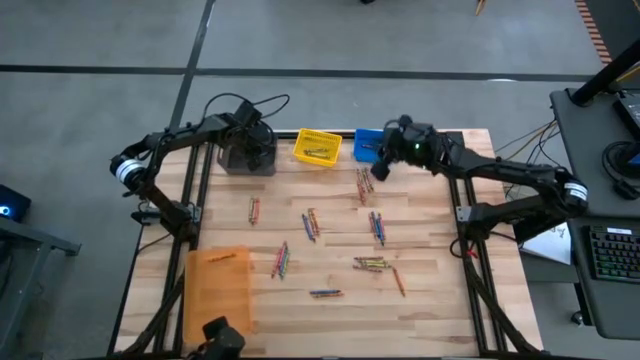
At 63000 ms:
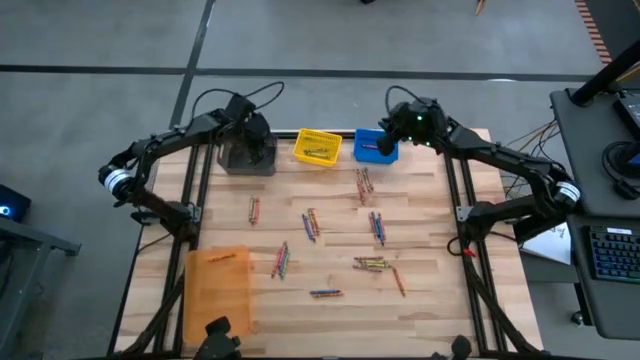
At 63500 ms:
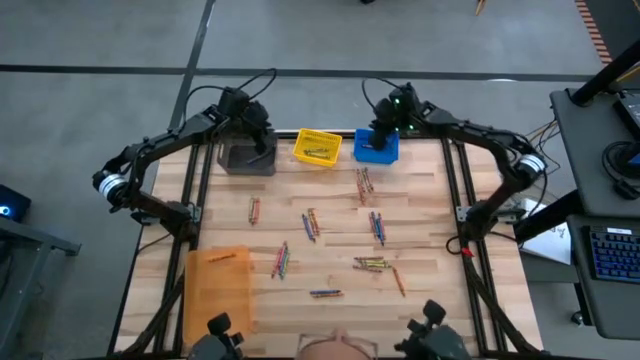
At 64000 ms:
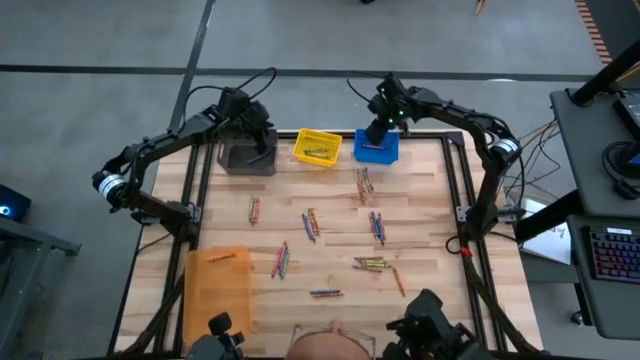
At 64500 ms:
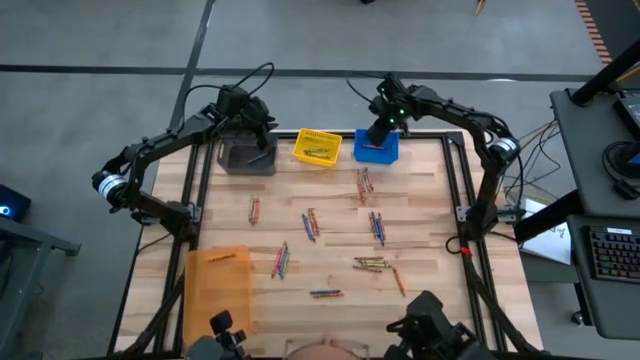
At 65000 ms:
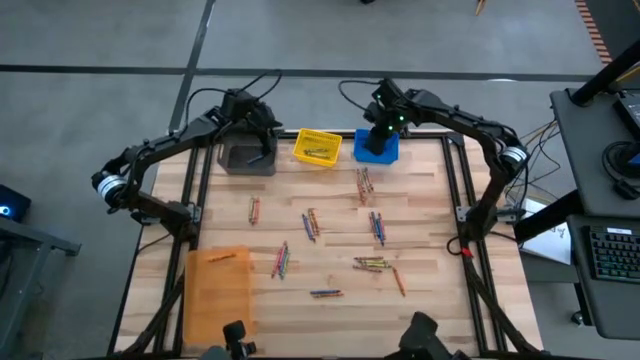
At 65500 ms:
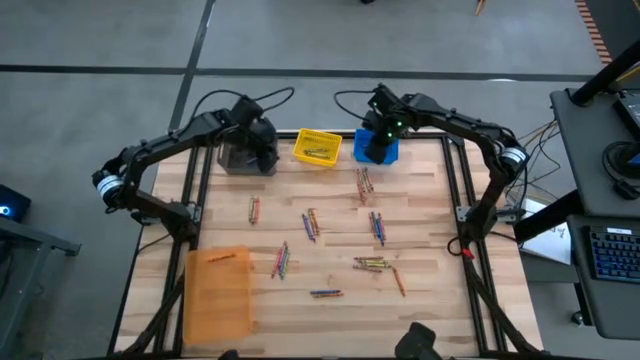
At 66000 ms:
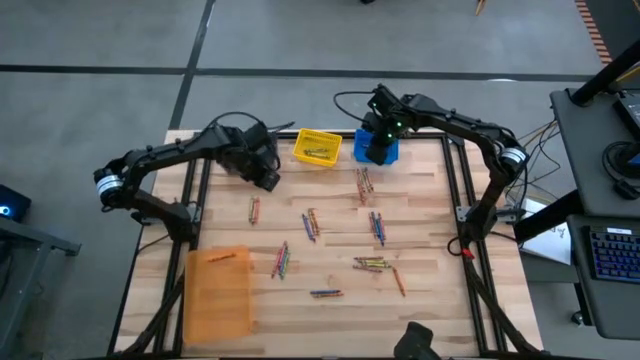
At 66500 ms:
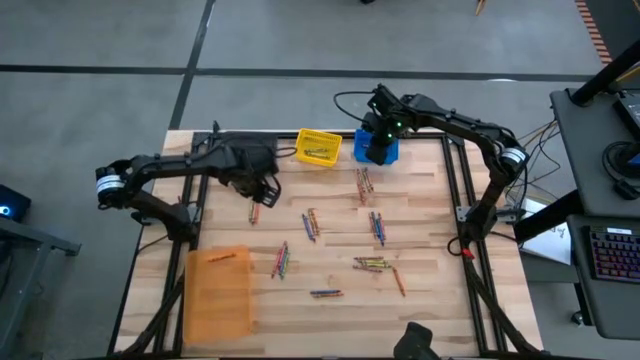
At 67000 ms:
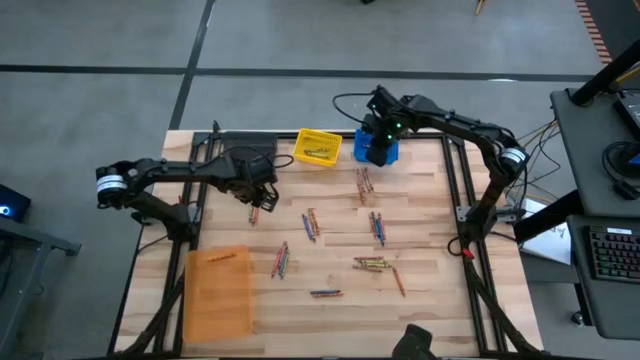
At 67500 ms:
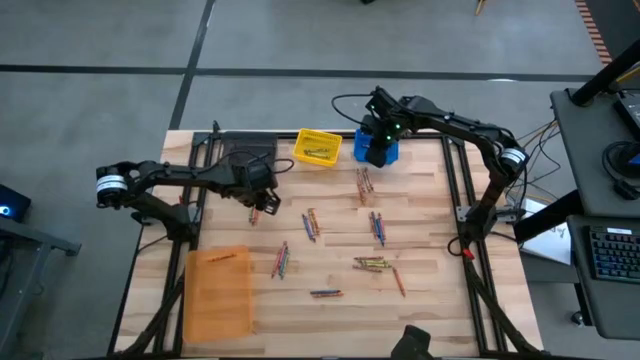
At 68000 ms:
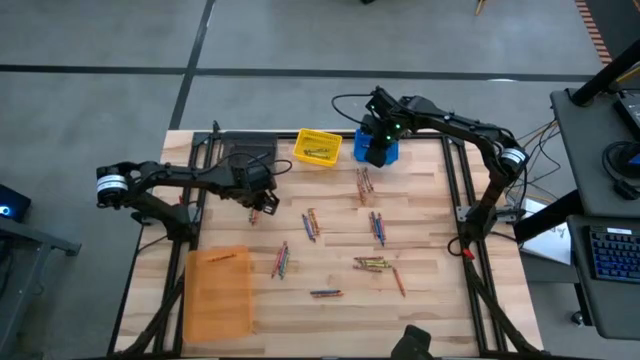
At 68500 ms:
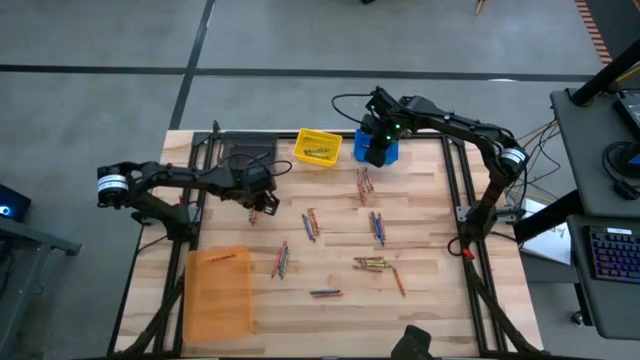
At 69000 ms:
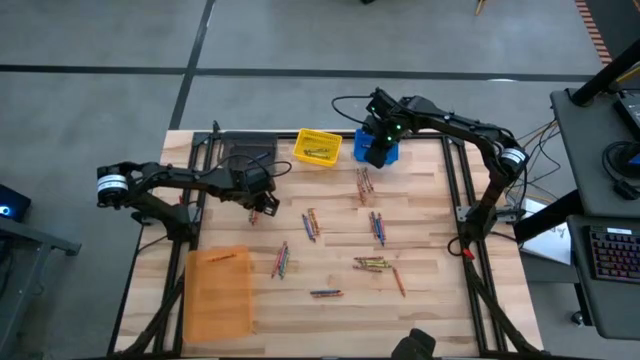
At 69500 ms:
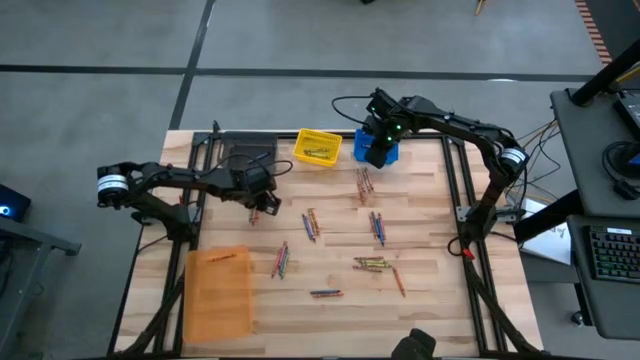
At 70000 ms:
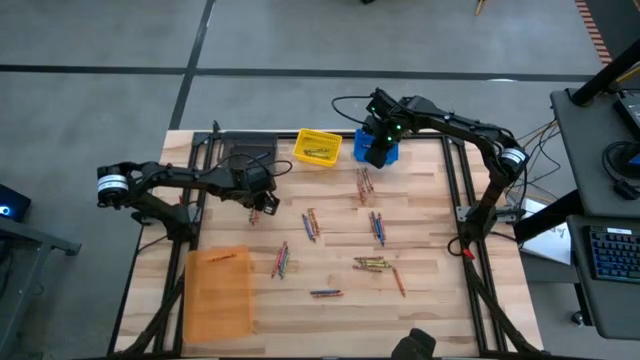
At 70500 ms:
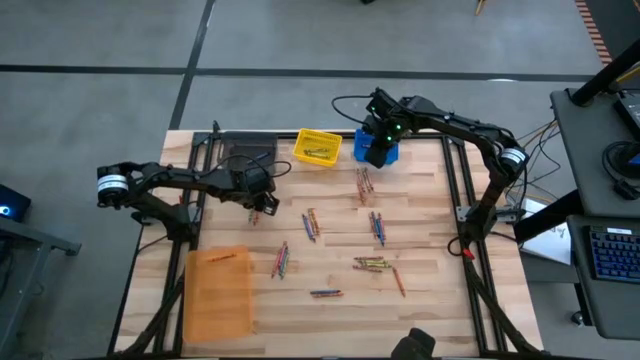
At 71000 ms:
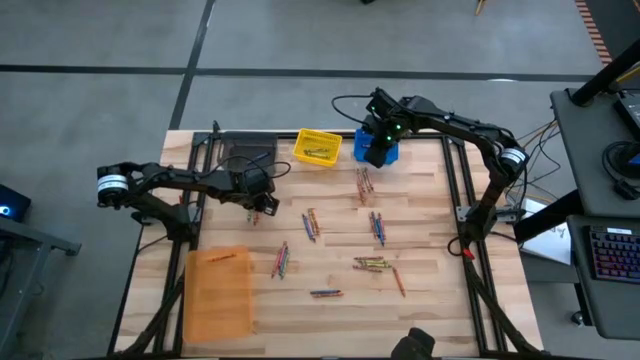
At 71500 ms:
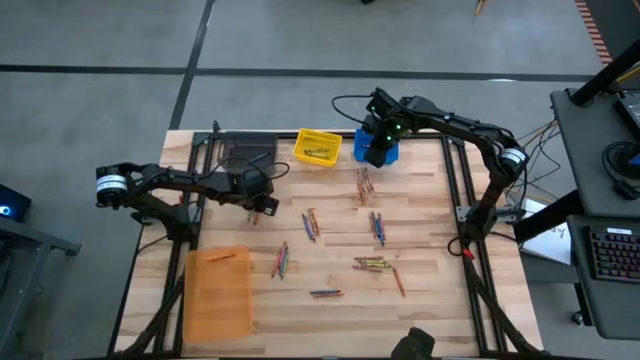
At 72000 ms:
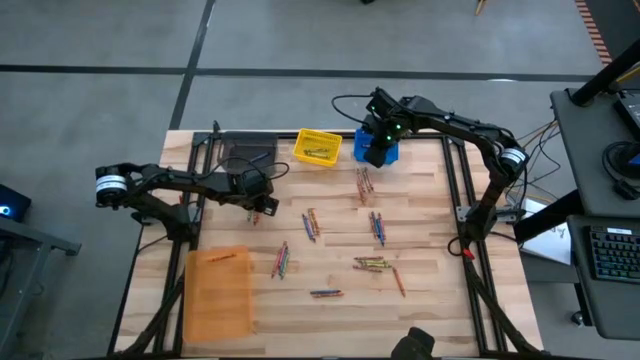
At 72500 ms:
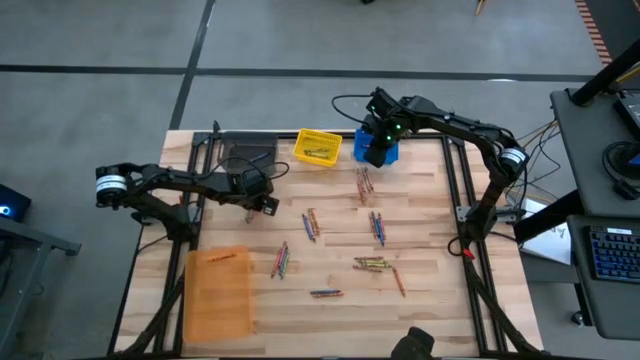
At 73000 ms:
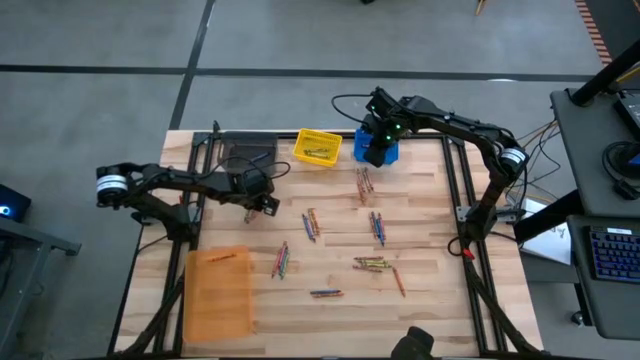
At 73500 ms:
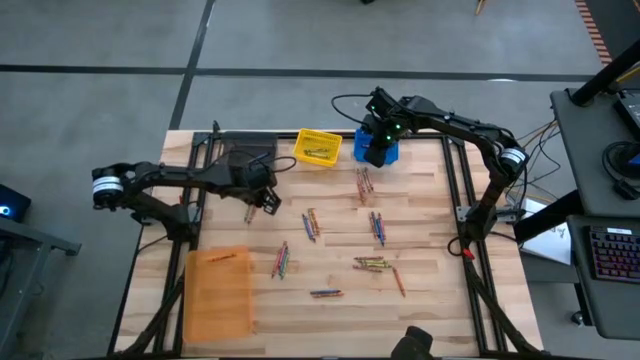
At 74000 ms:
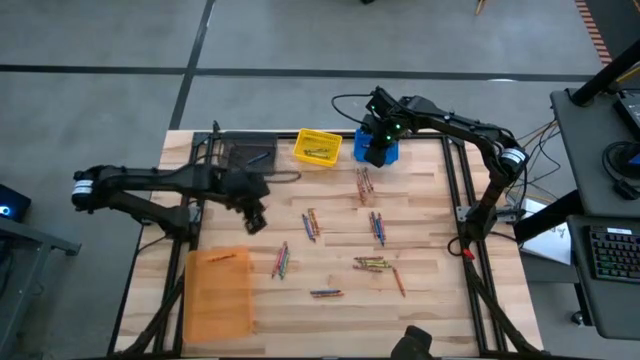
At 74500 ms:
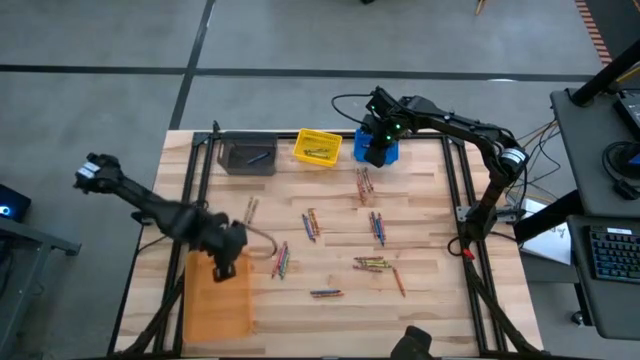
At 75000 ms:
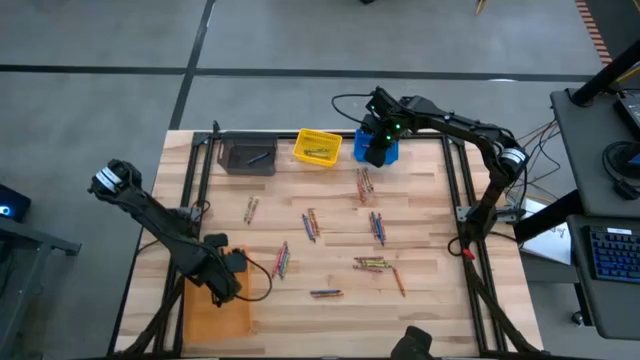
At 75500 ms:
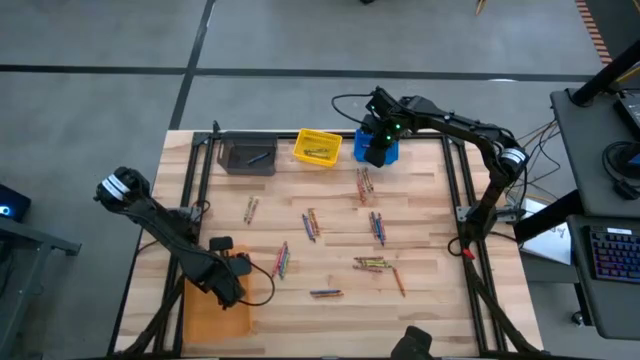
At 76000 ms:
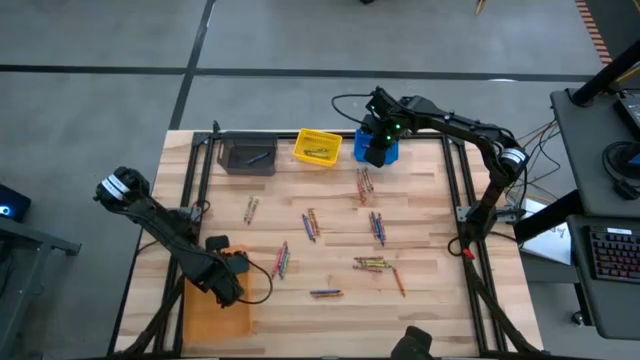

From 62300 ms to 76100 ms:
Task: Sort crayons
Put the orange crayon into the orange bin

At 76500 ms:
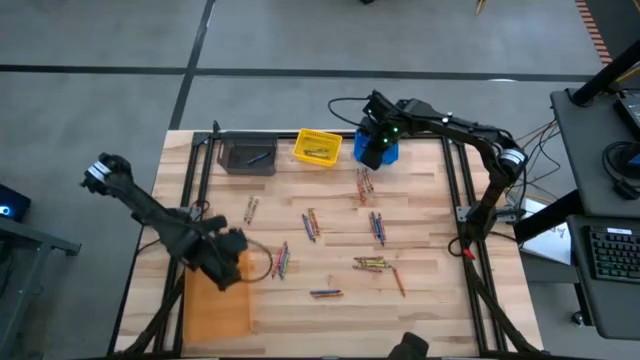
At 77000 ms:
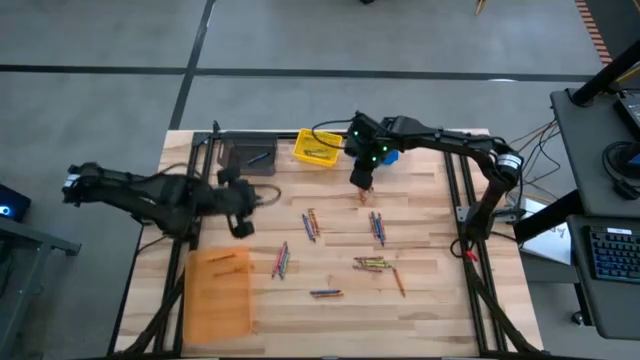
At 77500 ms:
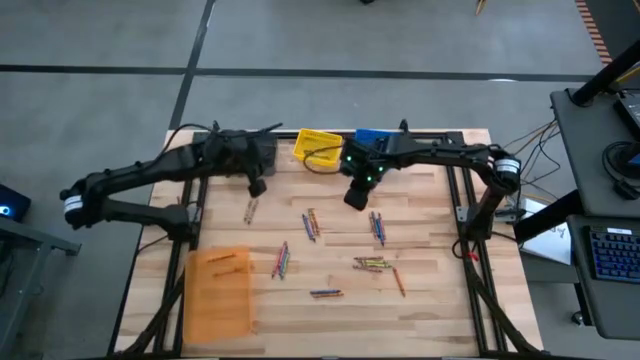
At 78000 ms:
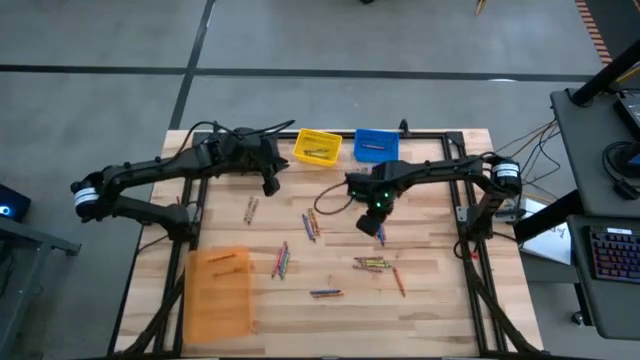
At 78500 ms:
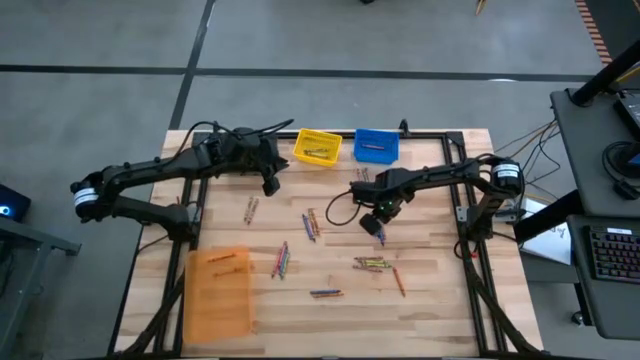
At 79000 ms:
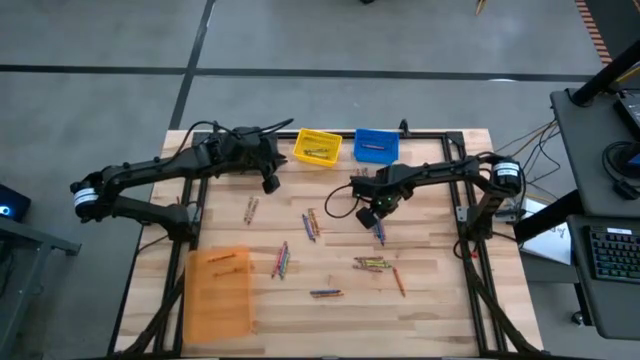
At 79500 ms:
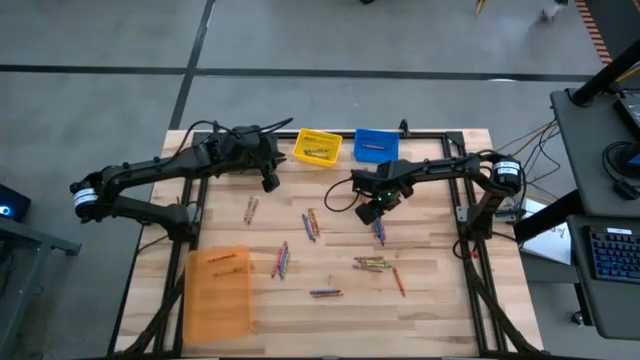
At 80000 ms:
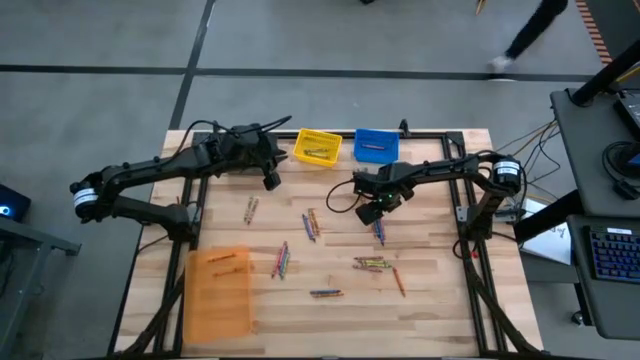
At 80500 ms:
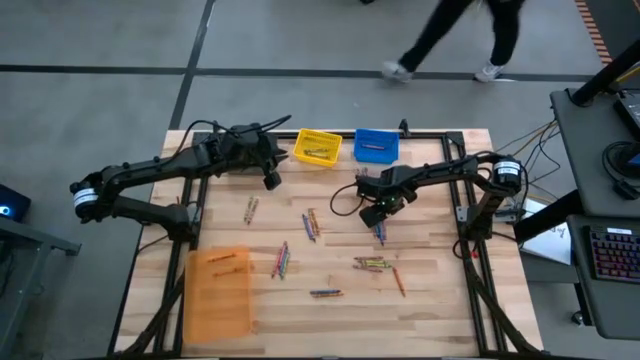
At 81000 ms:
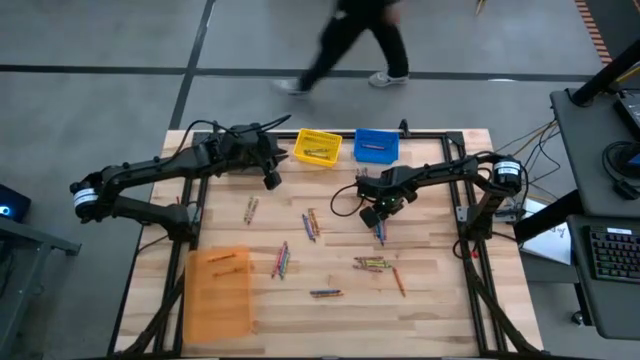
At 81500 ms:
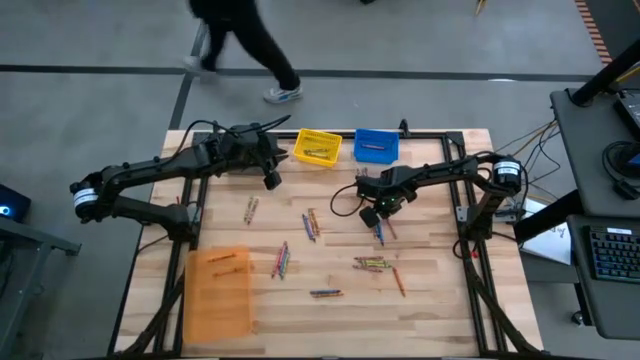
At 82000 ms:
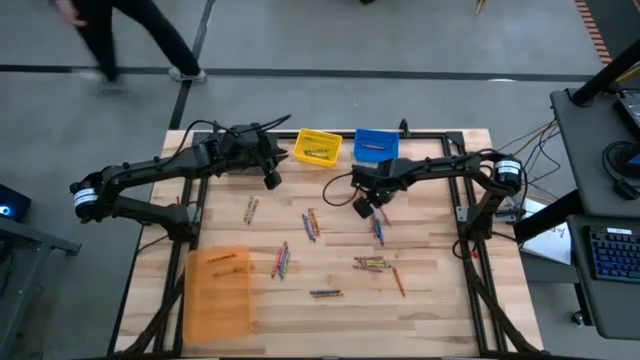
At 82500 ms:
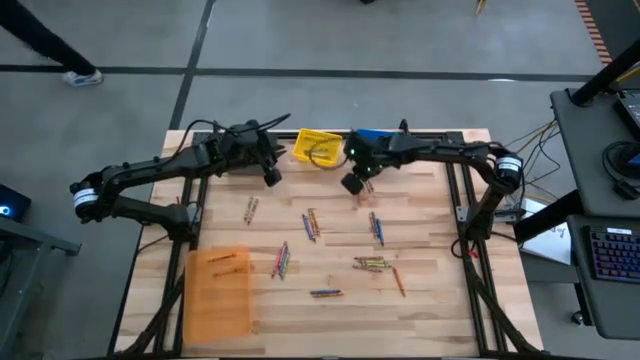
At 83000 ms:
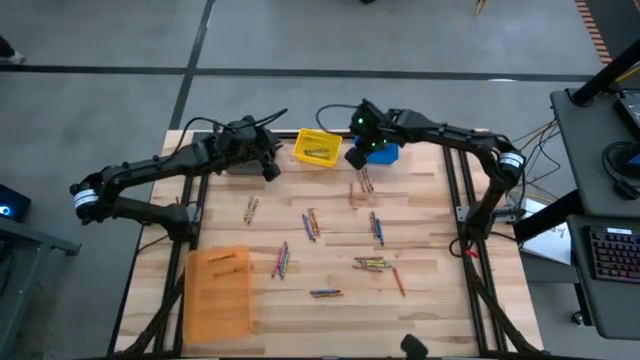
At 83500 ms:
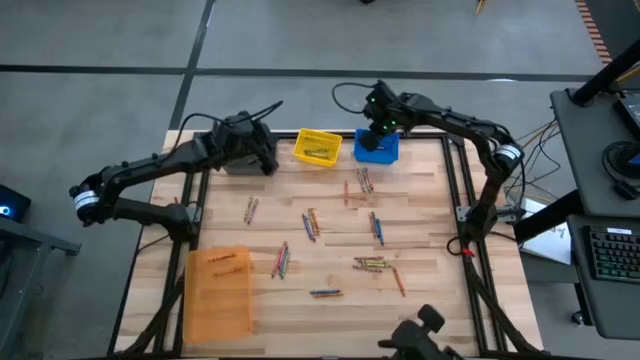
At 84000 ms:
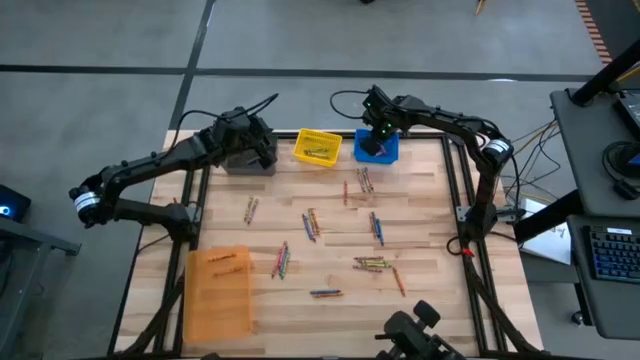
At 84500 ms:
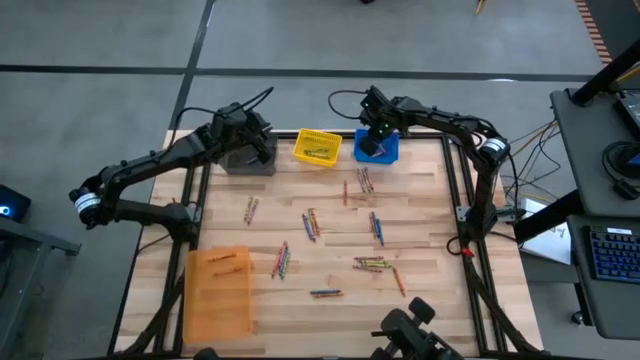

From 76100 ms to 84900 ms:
Put the red crayon into the blue bin
